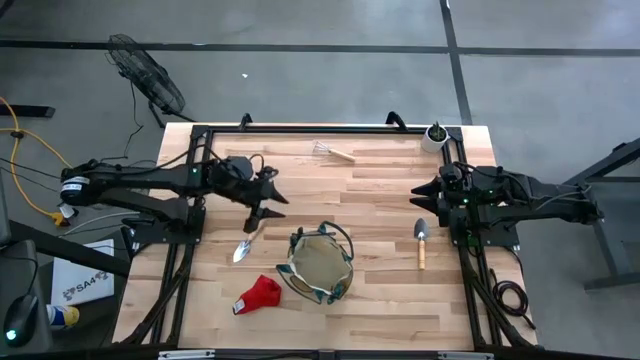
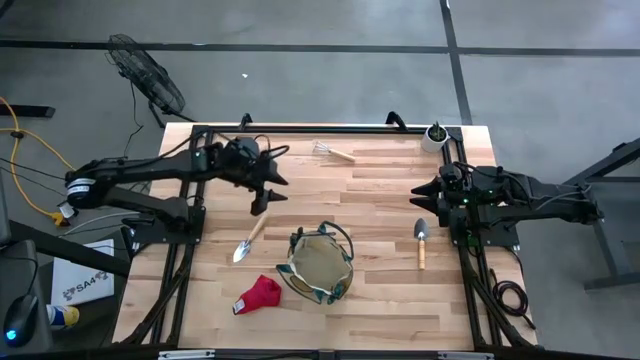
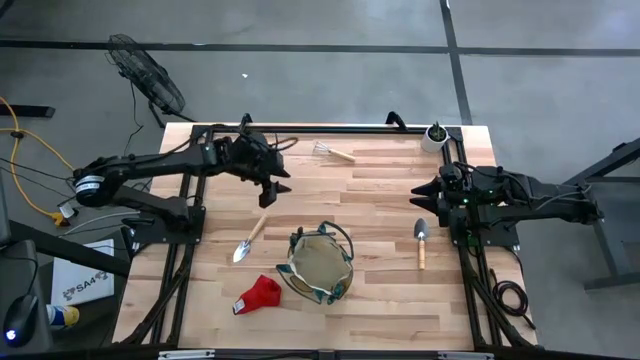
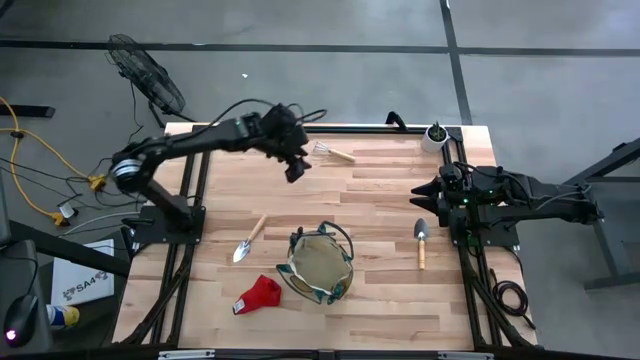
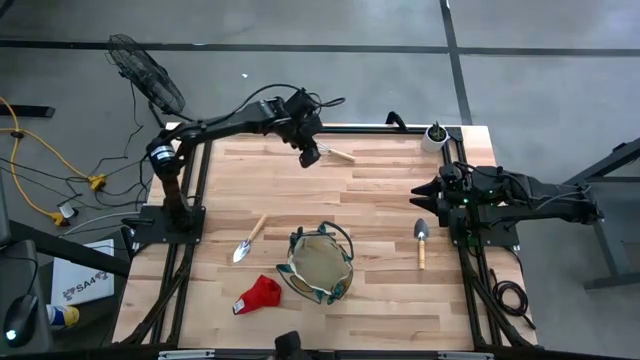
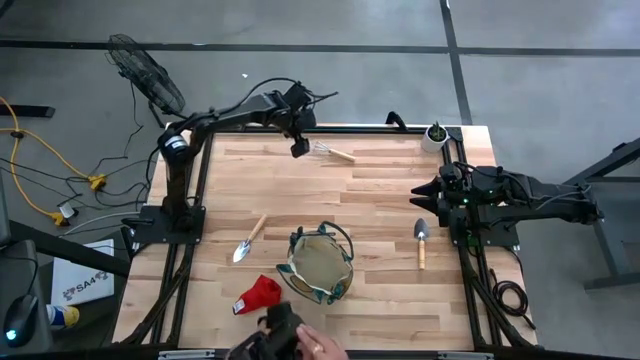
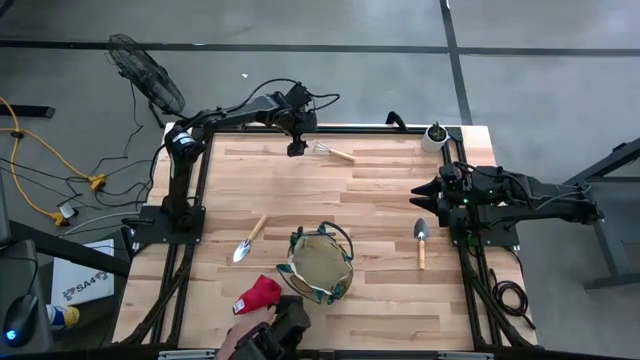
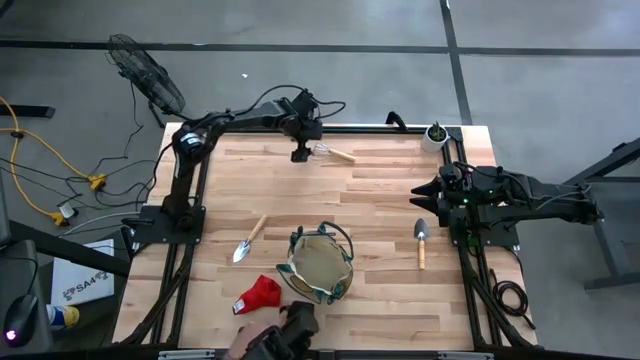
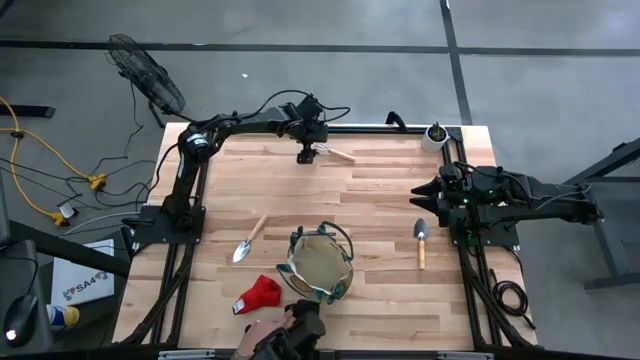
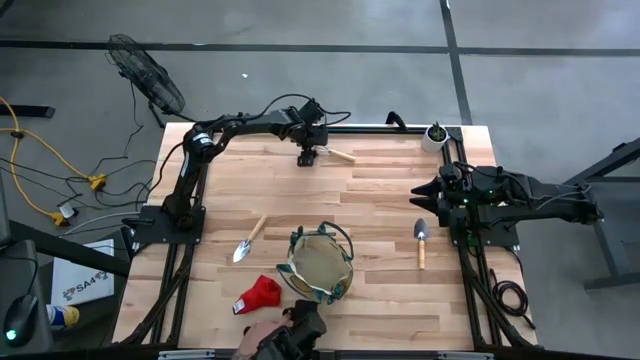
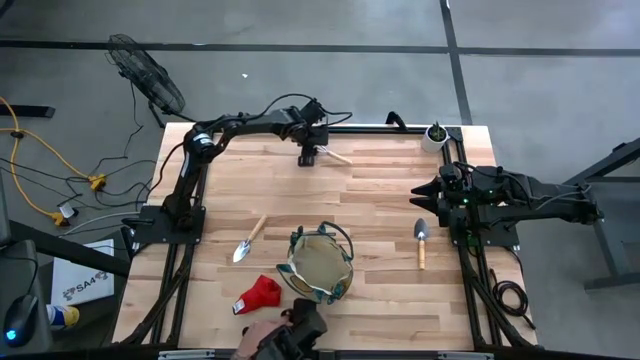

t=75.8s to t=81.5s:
Task: Pick & Place Garden tools in Gardening bag
Put the light brown hand rake into the light brown gardening bag

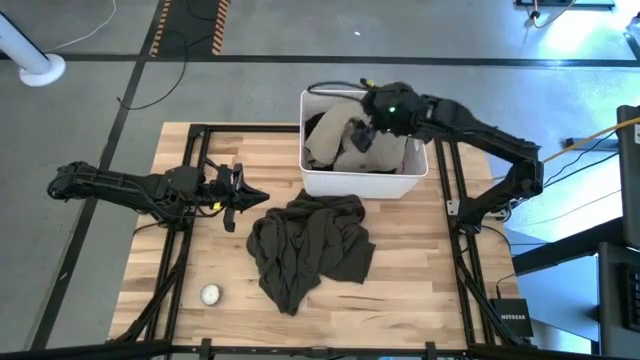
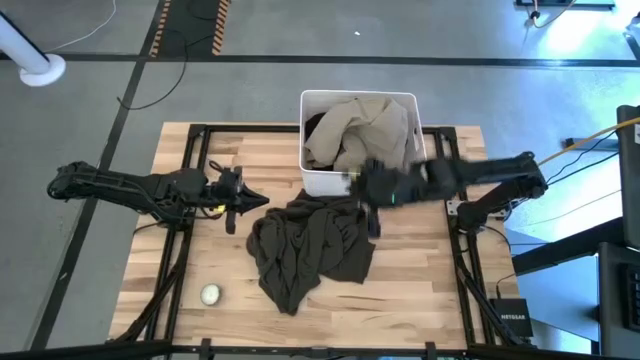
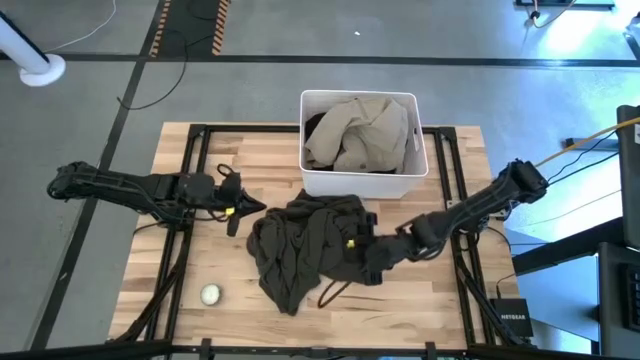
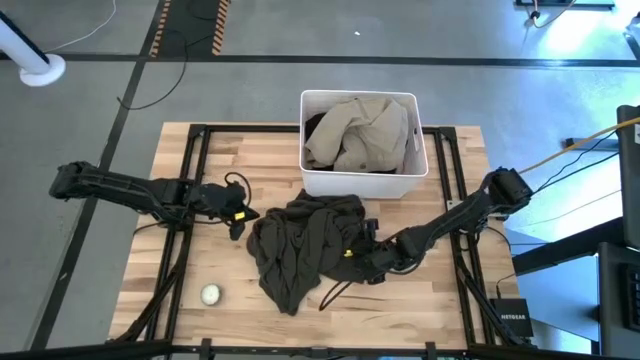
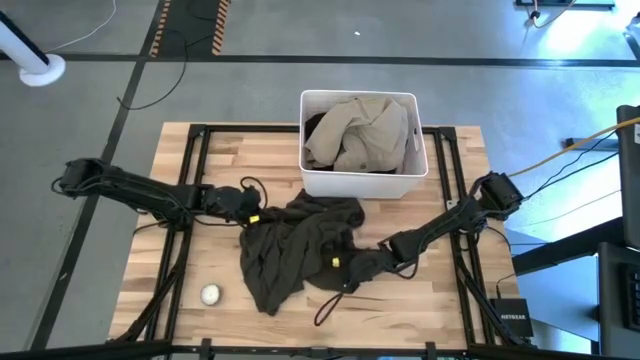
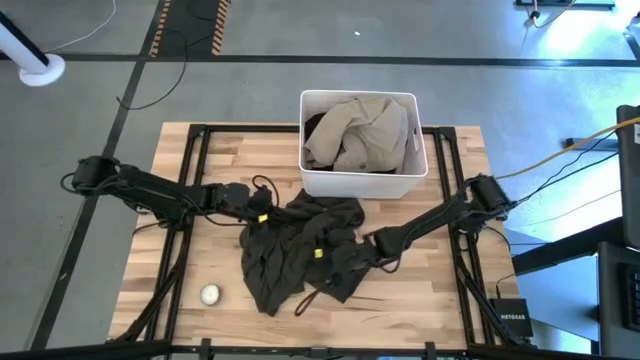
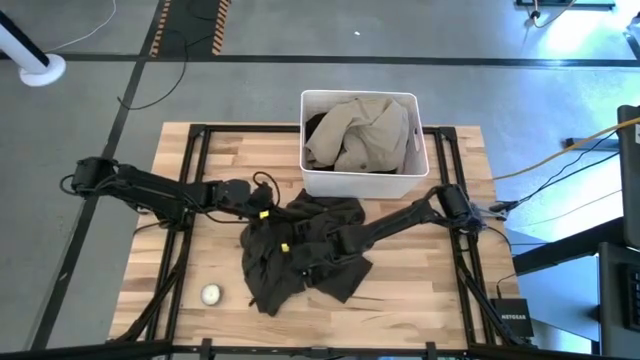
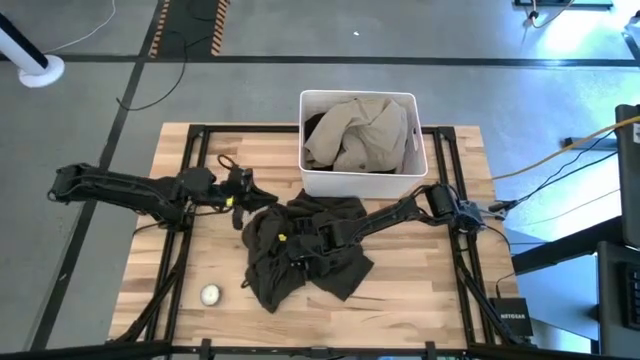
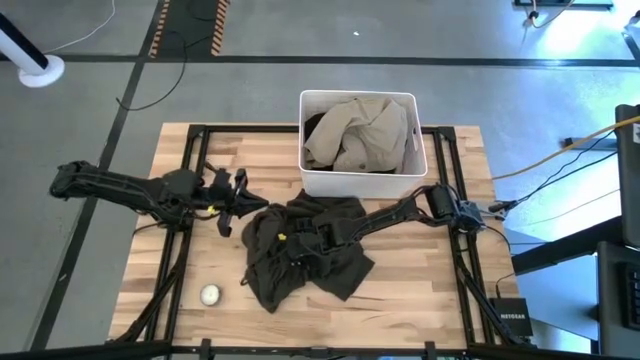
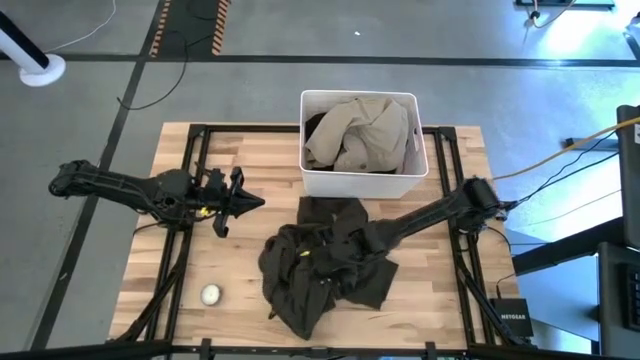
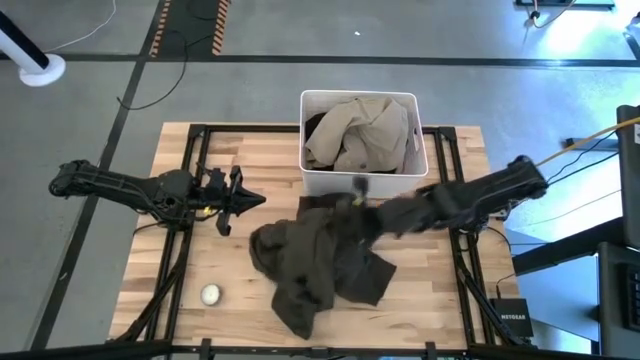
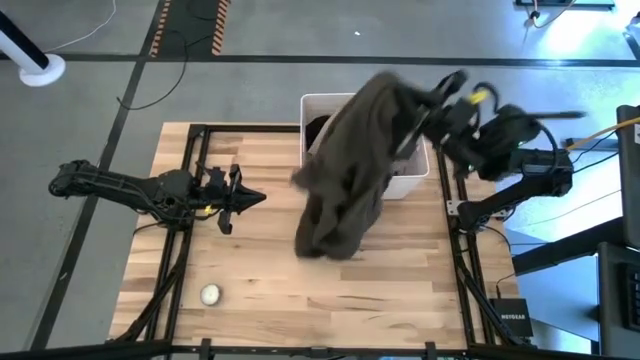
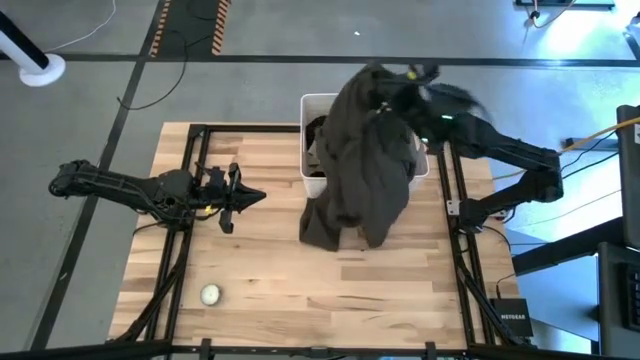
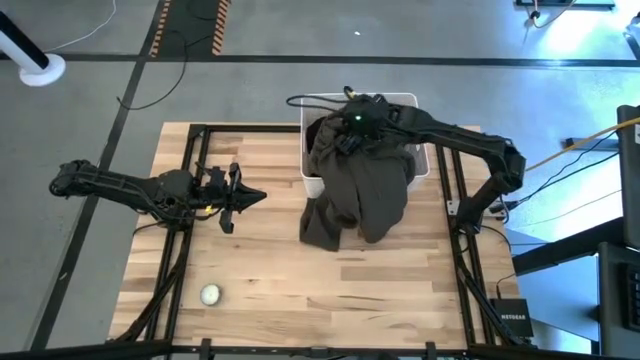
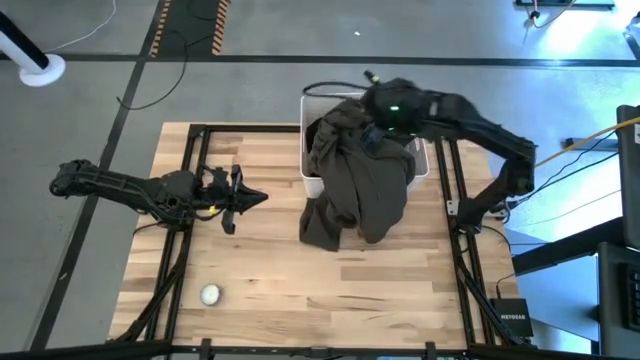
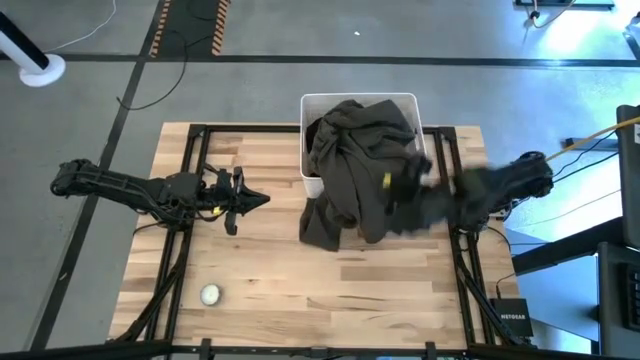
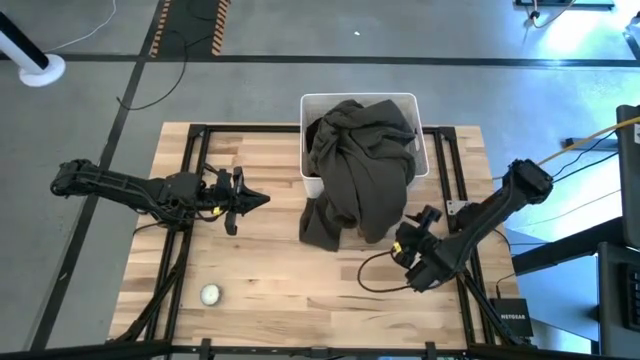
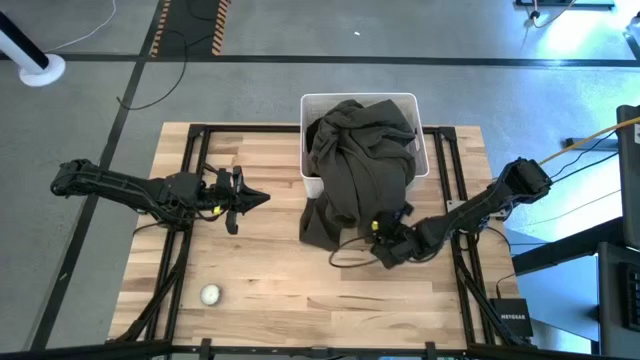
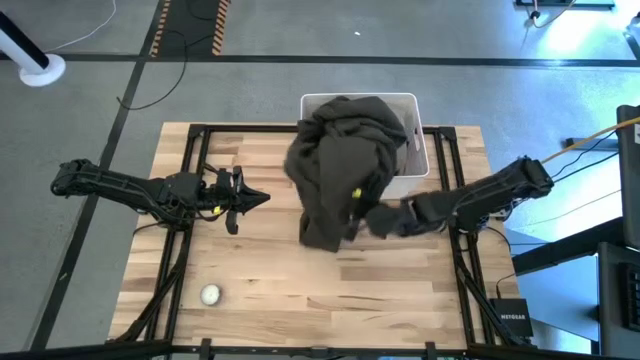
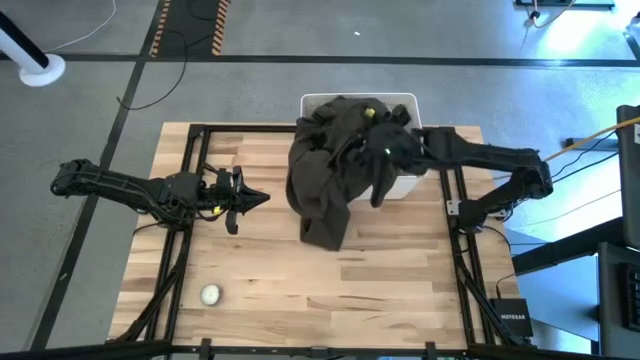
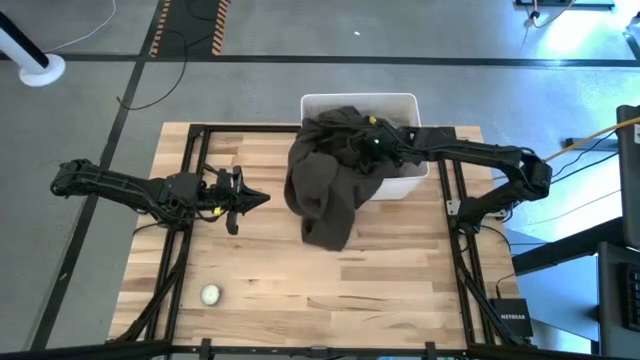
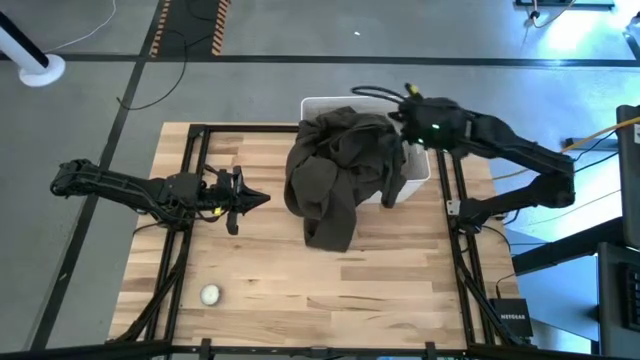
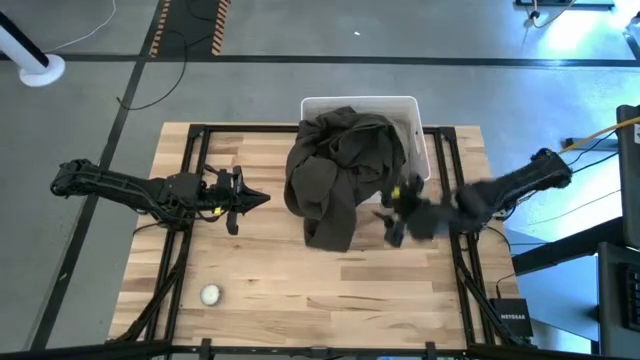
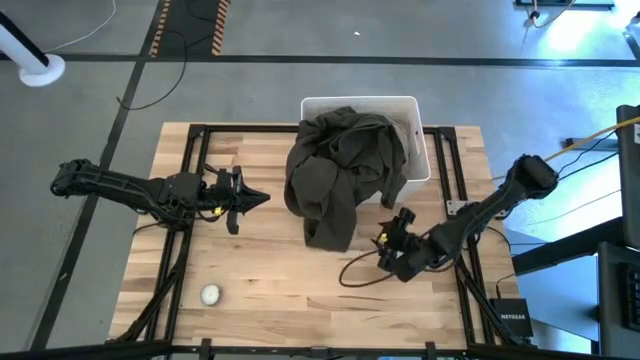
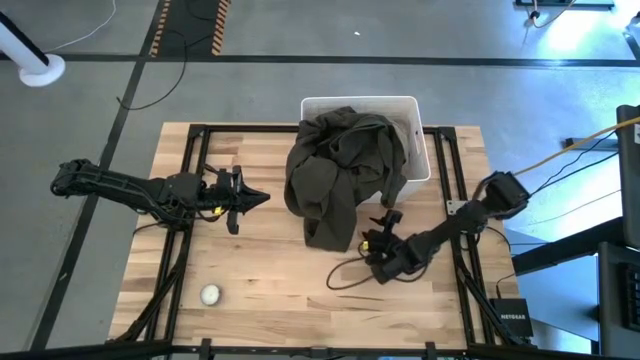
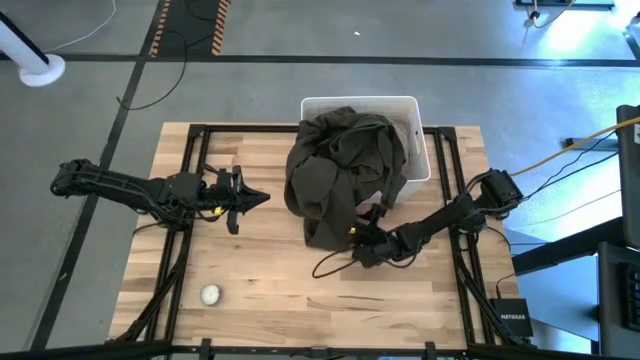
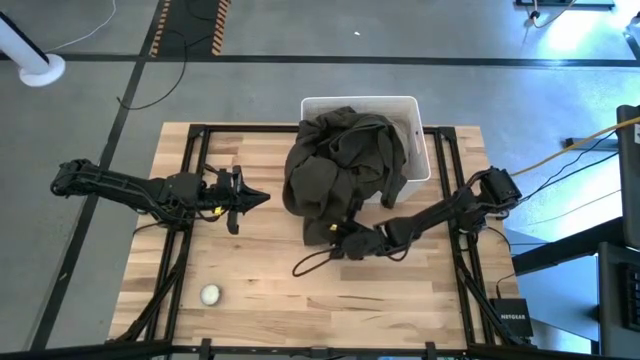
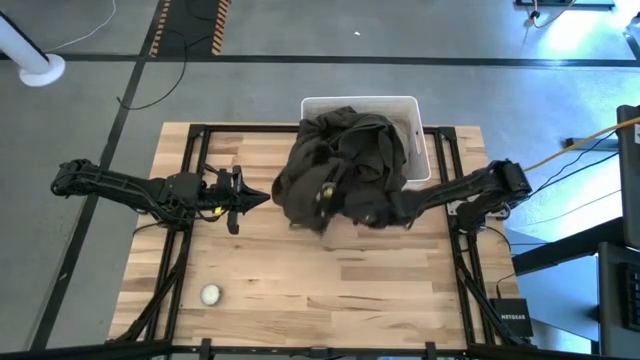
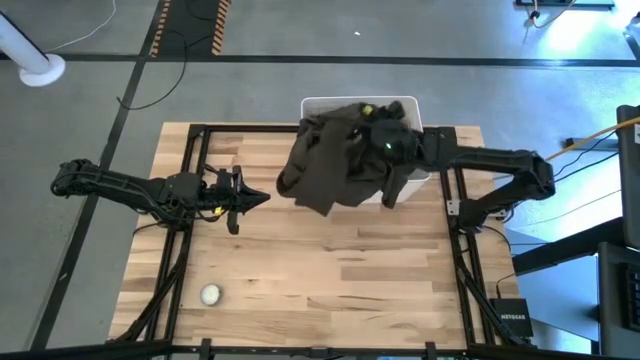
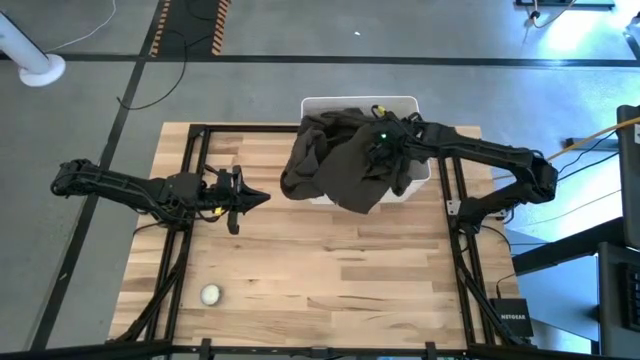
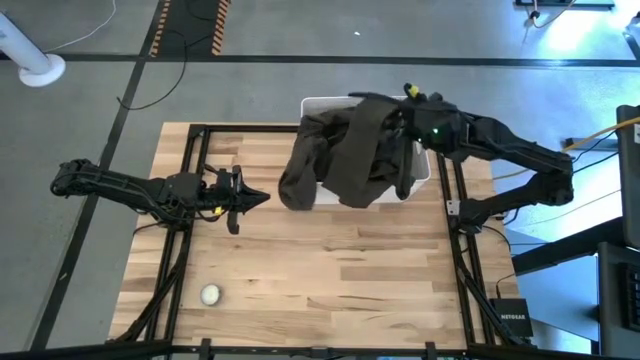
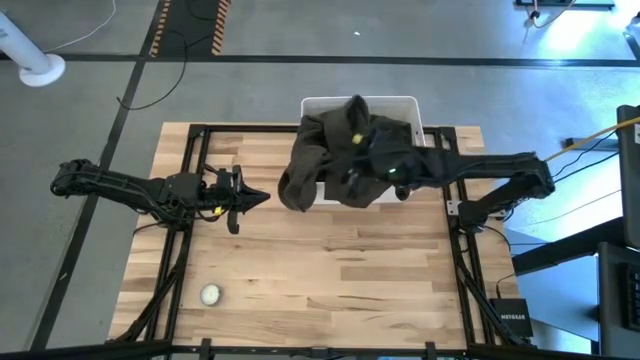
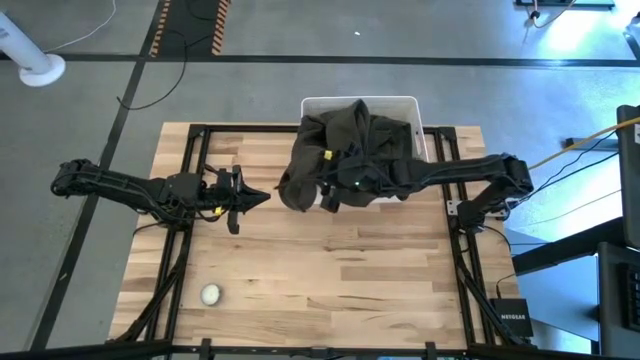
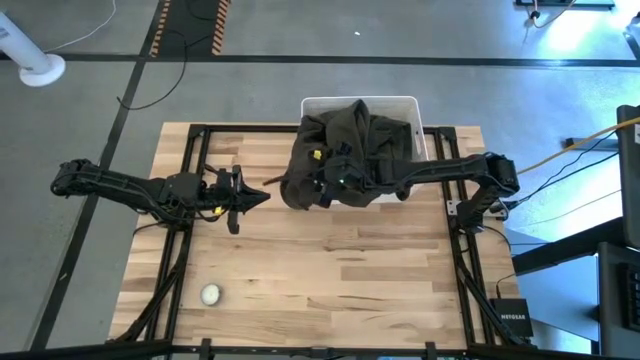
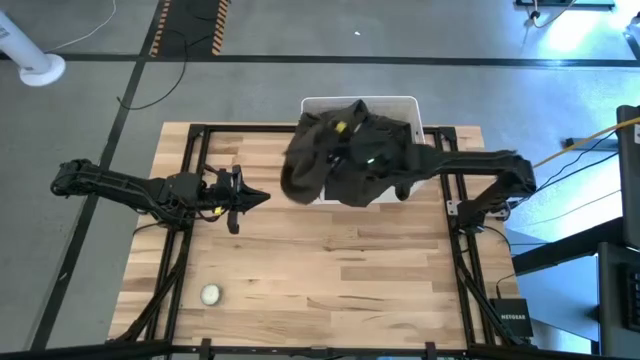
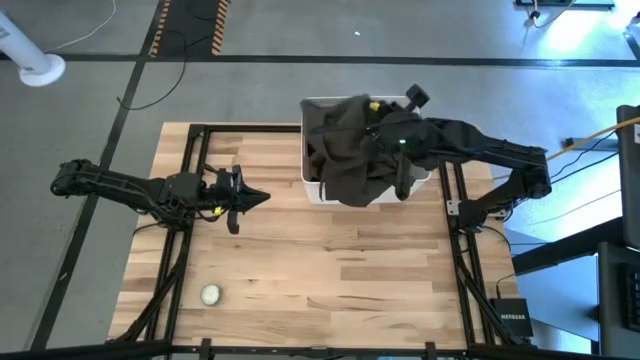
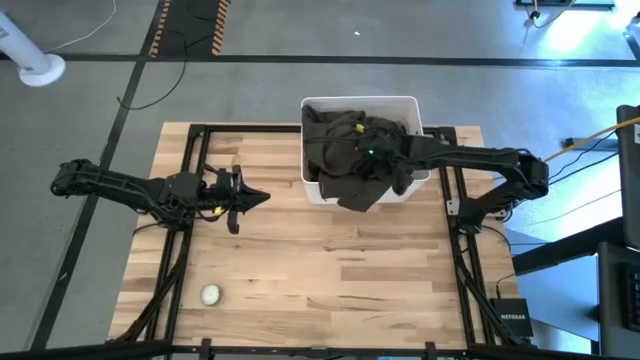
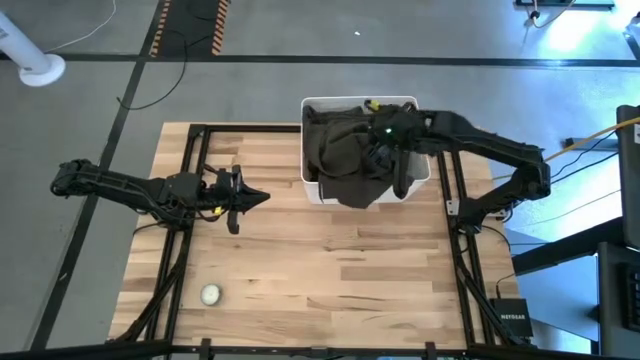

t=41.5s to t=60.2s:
Task: Sort clothes
Put the black jacket into the white laundry bin
